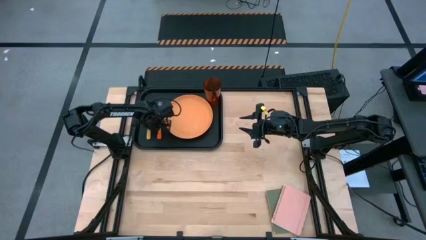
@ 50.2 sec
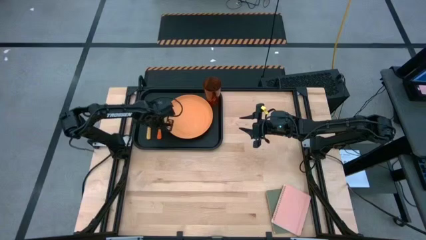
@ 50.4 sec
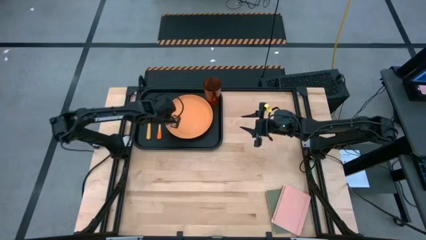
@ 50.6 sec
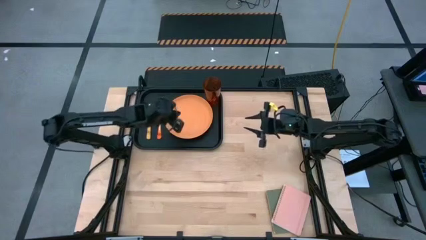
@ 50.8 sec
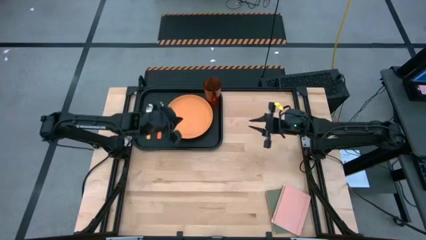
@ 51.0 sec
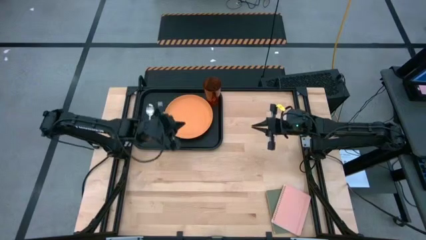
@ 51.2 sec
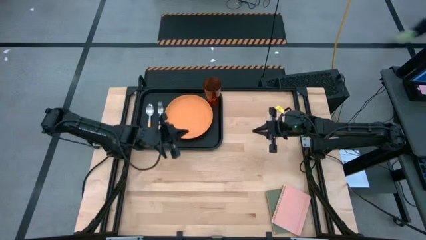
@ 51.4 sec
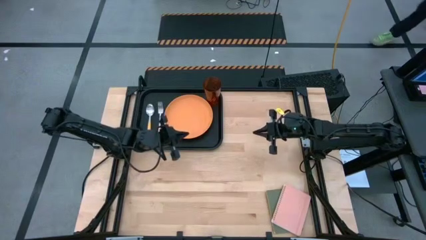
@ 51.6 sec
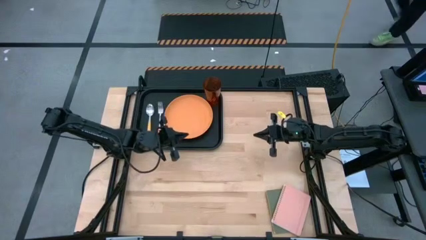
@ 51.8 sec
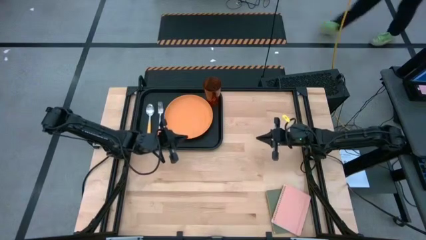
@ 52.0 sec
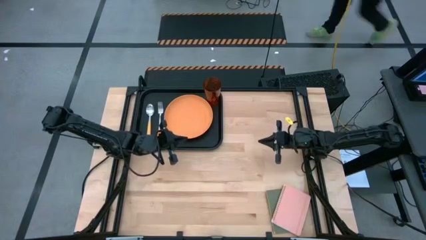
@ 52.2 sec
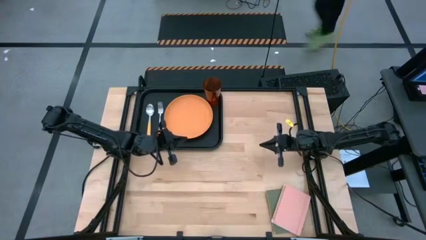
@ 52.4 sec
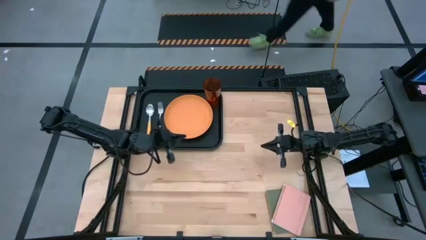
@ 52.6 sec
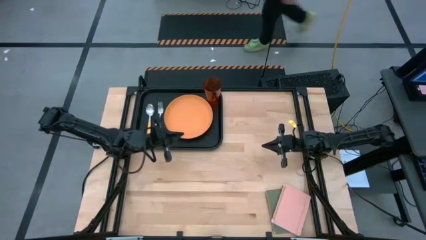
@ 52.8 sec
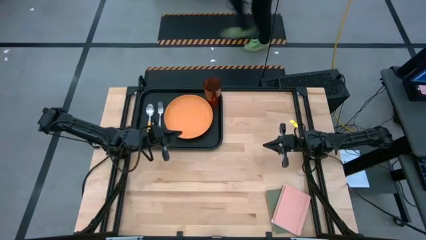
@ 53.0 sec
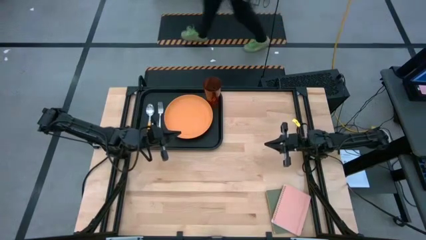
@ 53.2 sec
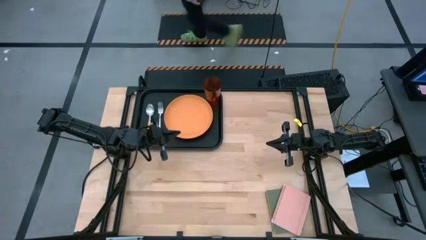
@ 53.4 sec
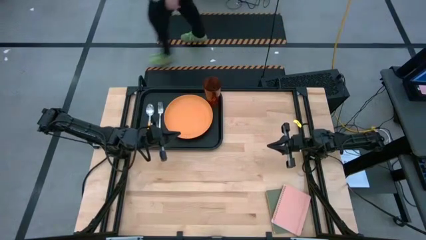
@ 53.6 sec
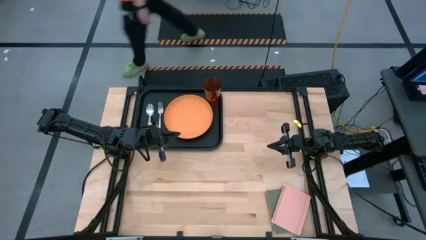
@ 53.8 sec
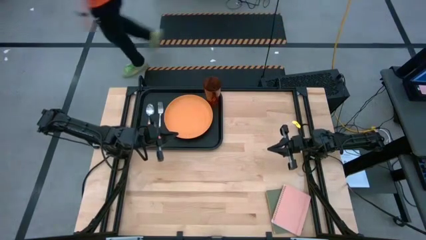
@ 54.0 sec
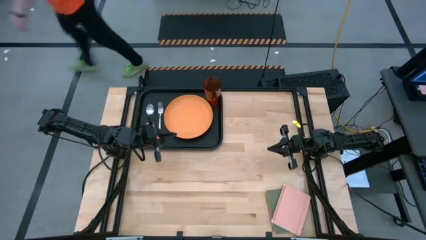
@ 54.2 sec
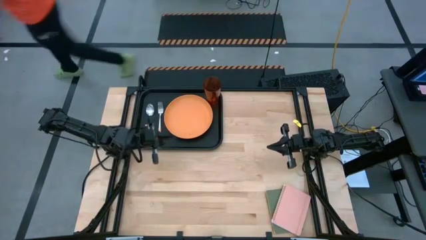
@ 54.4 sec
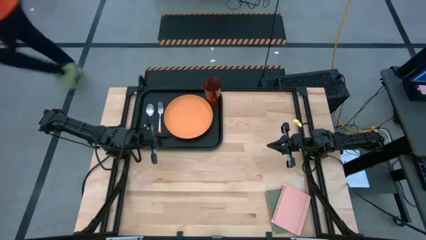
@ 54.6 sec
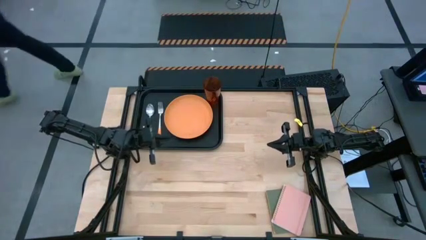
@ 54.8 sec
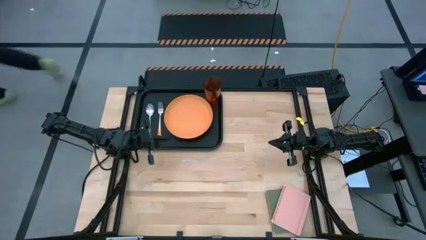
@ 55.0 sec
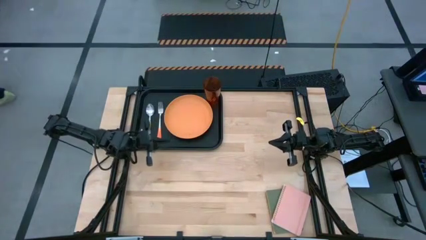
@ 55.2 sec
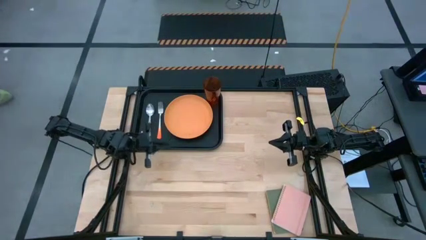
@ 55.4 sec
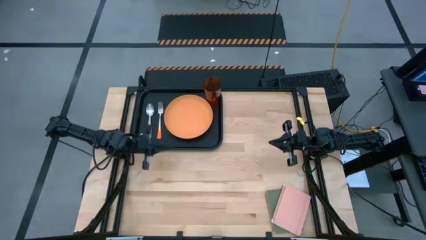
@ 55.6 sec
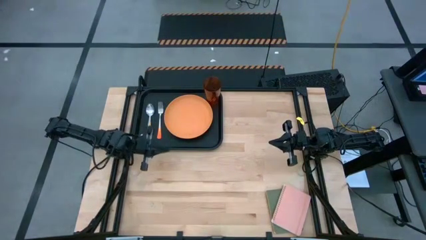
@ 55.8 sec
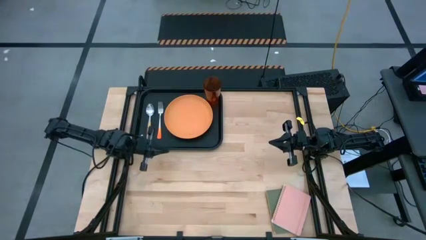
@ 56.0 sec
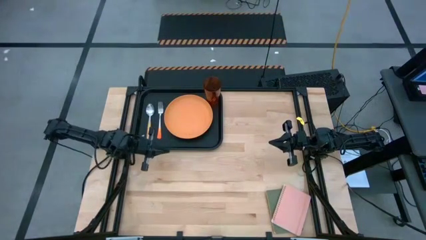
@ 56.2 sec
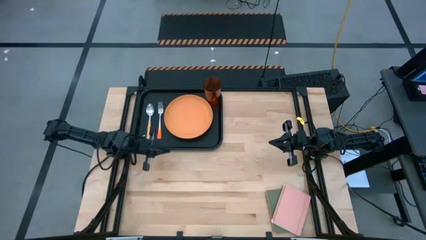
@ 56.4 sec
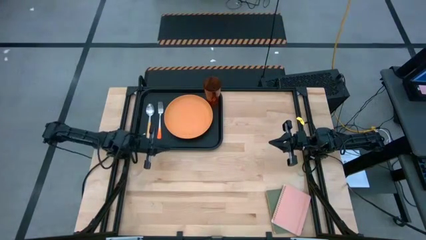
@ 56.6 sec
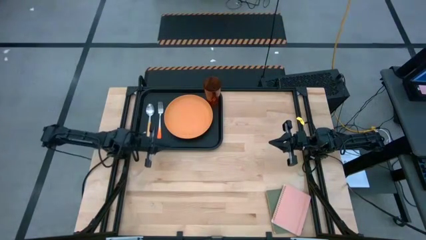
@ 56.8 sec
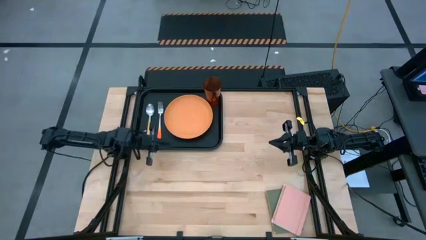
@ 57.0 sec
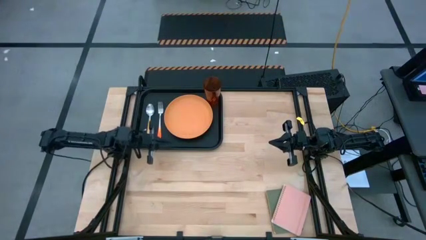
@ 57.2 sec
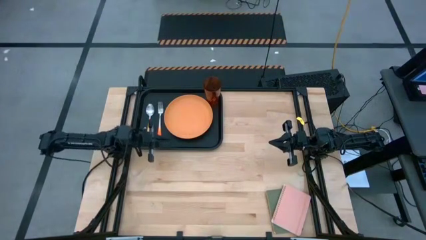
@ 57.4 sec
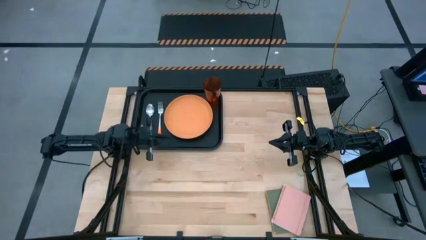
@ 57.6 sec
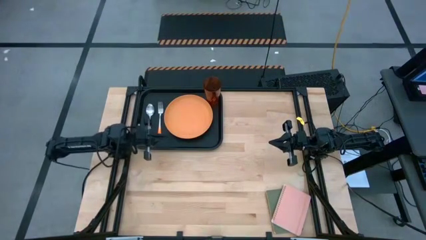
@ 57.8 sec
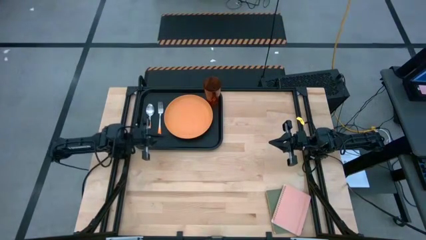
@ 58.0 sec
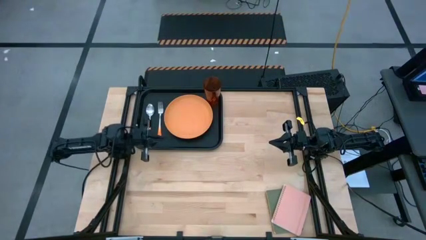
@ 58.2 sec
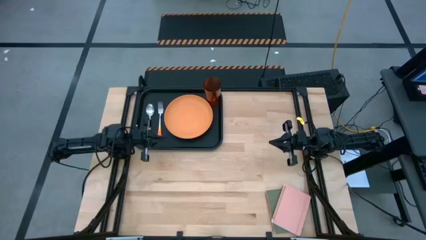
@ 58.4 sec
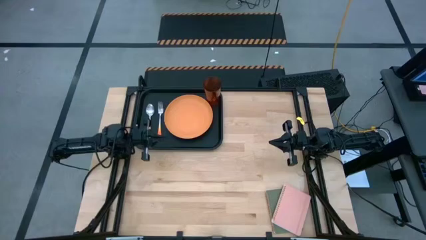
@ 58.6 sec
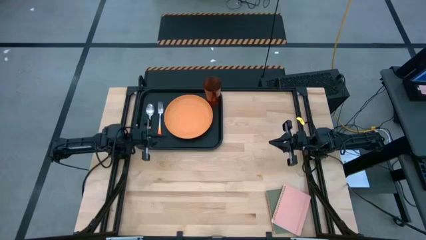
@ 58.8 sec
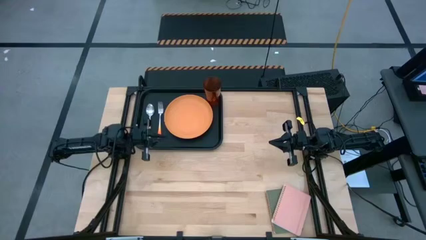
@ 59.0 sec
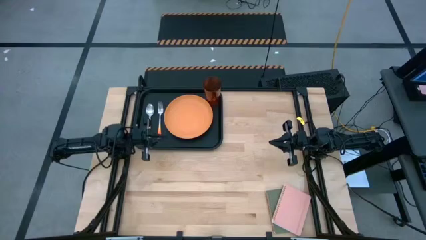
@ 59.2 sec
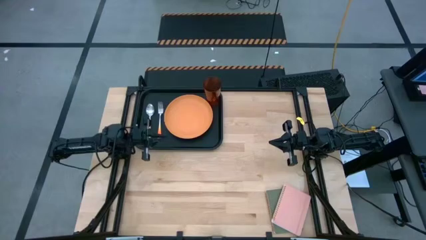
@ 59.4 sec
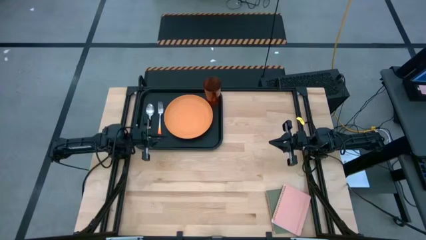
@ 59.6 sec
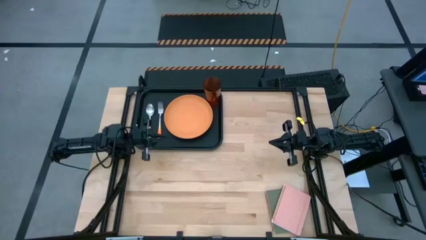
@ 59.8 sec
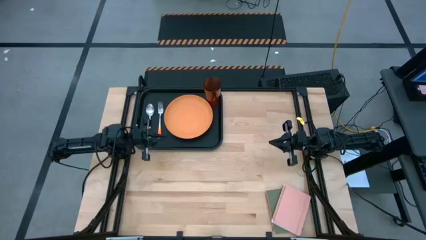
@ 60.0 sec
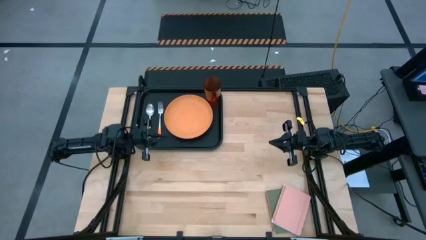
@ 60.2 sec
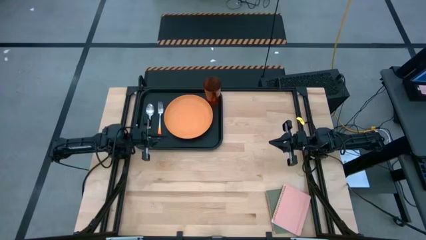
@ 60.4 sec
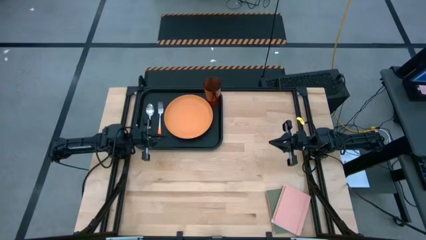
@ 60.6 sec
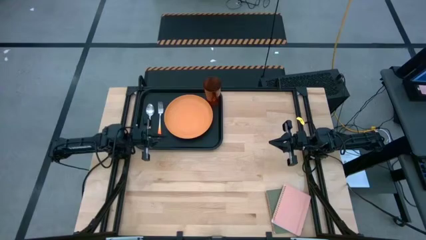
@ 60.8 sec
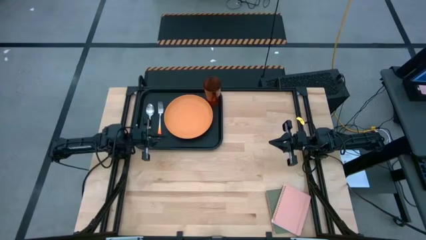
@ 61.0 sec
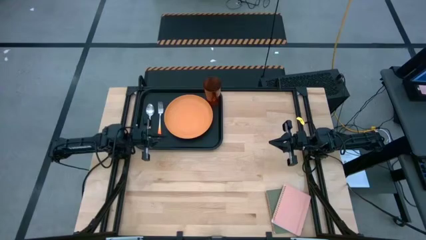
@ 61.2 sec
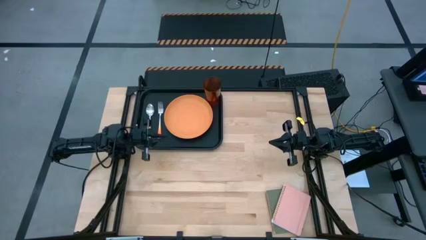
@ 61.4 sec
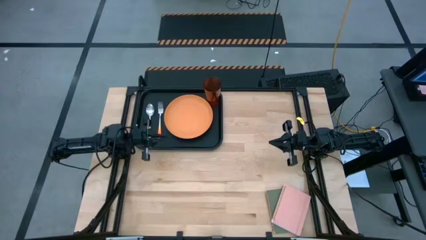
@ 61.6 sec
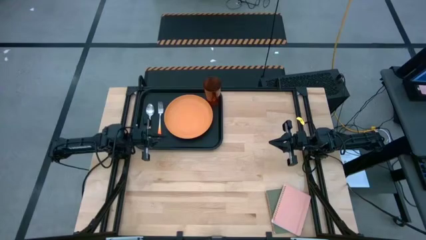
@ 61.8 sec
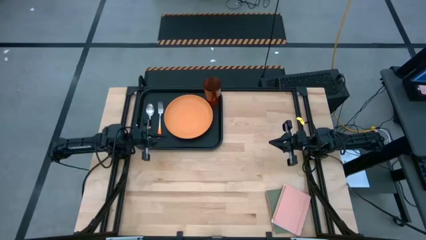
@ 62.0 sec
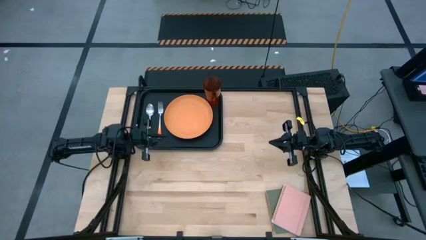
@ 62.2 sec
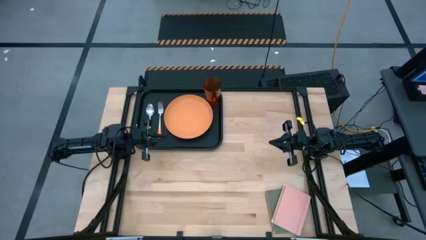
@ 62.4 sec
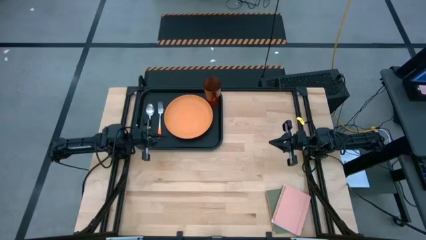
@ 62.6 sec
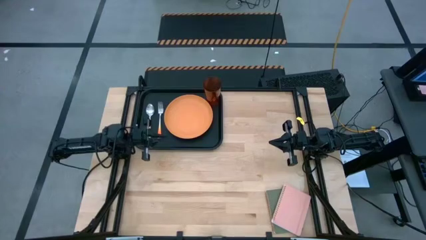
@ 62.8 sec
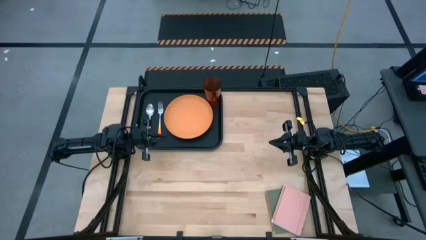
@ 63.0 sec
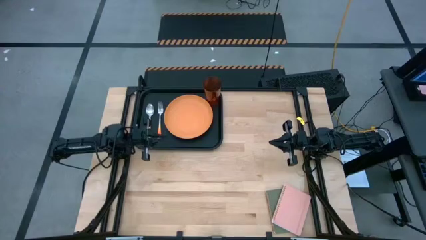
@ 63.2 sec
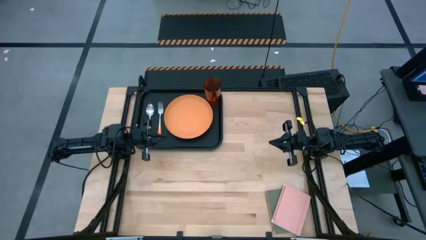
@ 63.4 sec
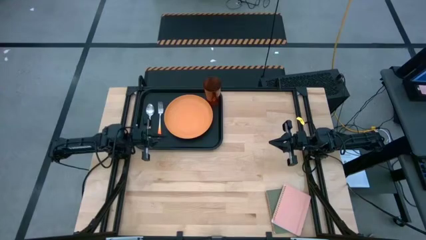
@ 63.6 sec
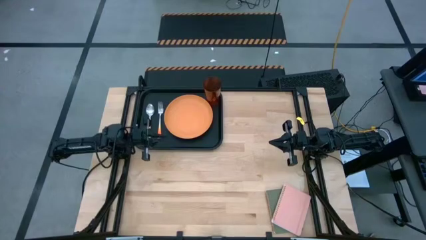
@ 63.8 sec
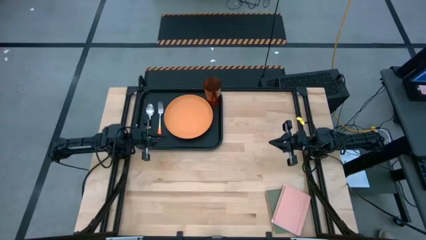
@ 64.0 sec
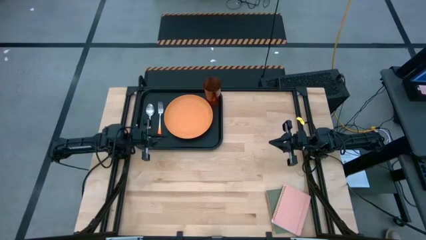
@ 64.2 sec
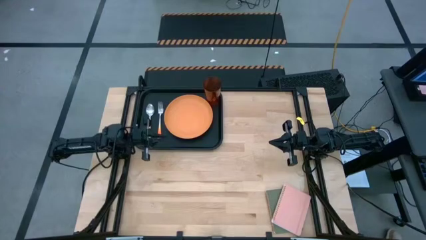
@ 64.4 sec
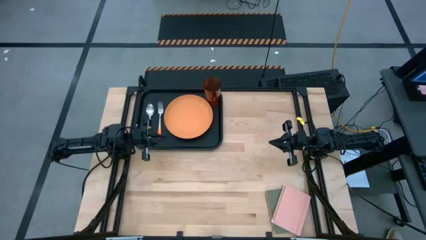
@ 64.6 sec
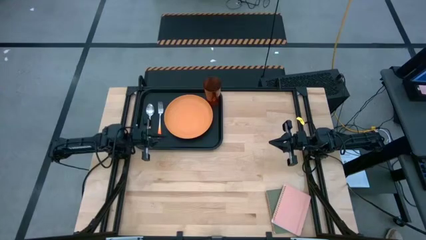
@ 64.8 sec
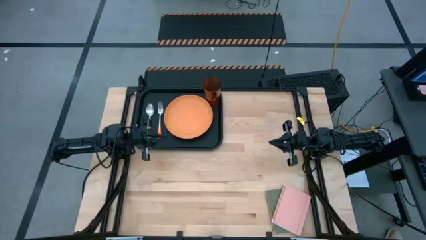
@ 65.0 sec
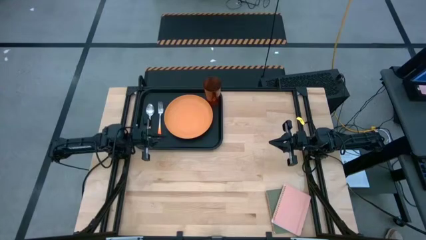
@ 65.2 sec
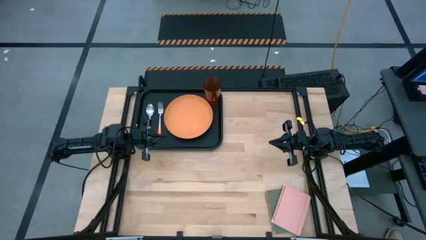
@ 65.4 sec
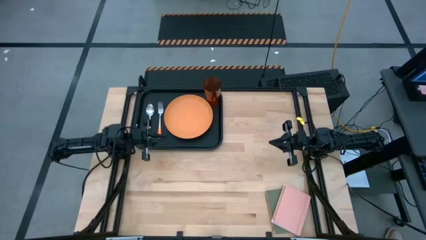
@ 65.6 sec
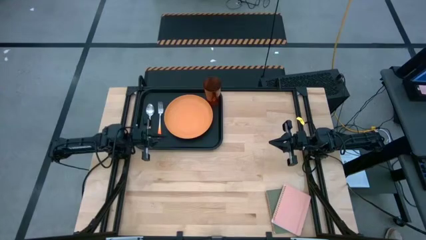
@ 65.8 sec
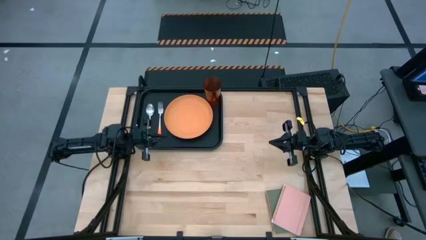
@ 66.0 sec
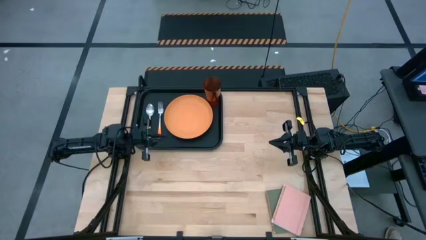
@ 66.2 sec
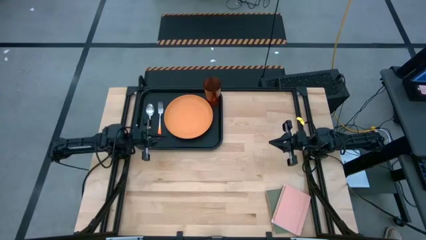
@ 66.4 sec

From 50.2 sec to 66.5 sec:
Task: Pick and place plate/cup/fork/spoon on tray
Return to Home Position
